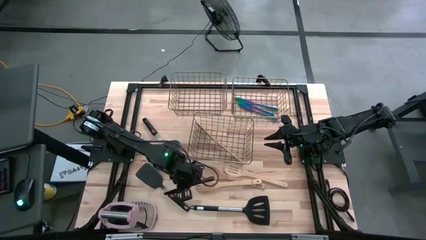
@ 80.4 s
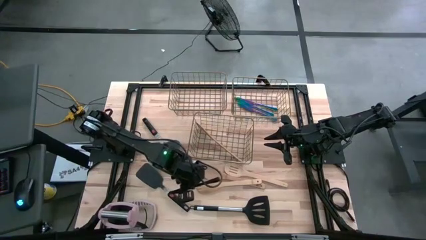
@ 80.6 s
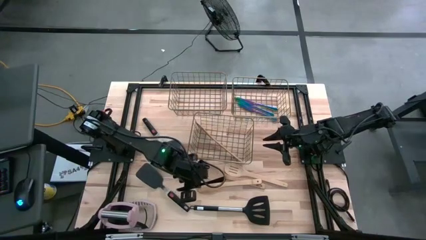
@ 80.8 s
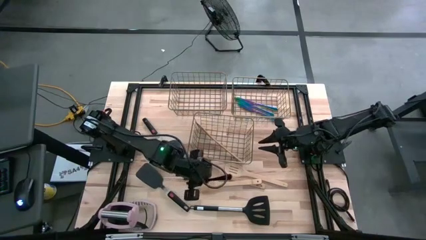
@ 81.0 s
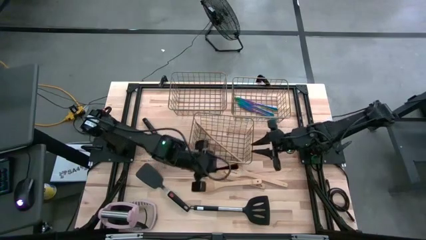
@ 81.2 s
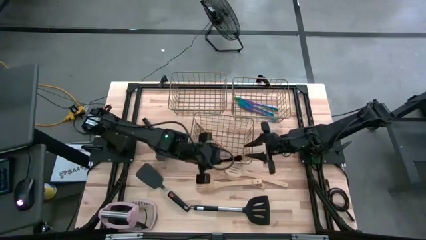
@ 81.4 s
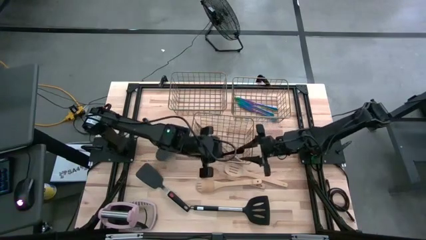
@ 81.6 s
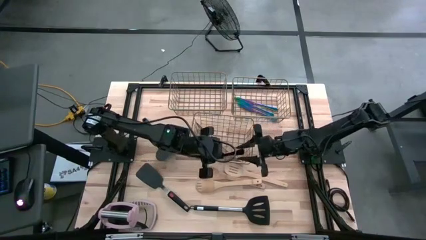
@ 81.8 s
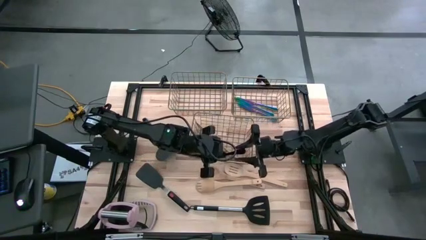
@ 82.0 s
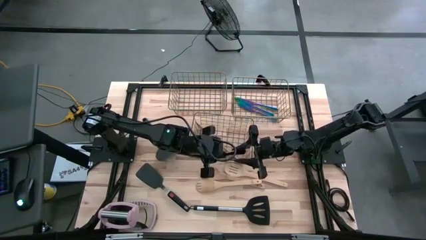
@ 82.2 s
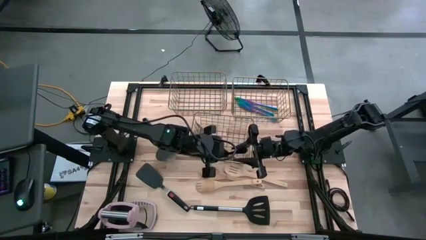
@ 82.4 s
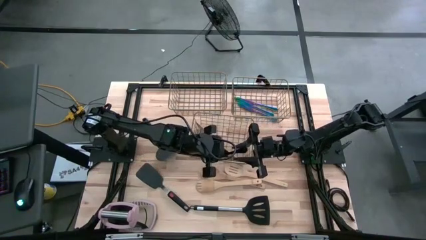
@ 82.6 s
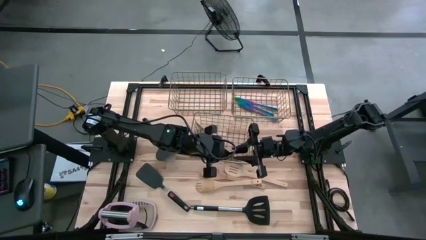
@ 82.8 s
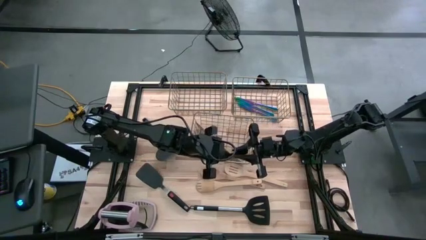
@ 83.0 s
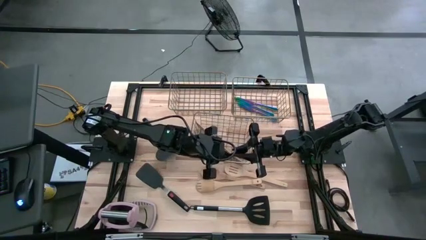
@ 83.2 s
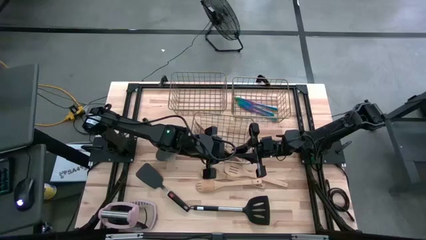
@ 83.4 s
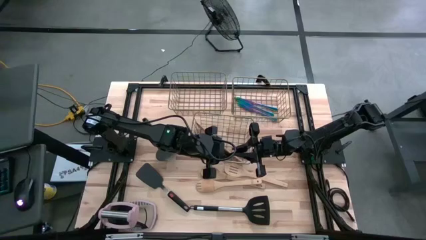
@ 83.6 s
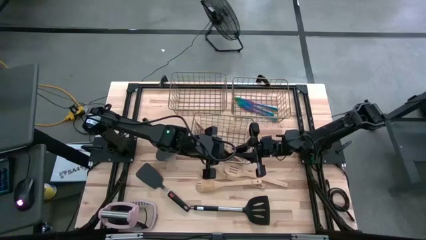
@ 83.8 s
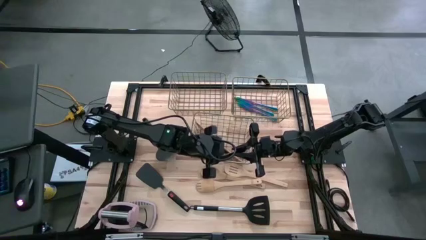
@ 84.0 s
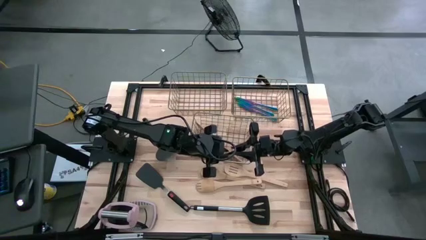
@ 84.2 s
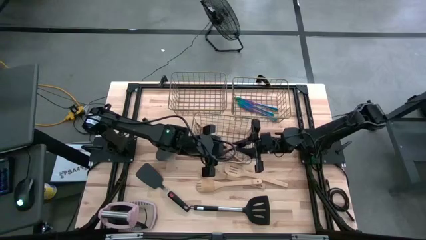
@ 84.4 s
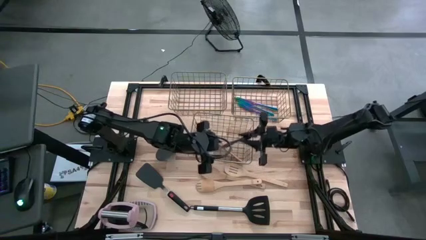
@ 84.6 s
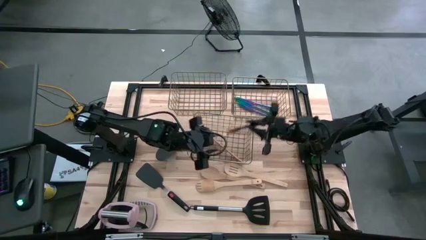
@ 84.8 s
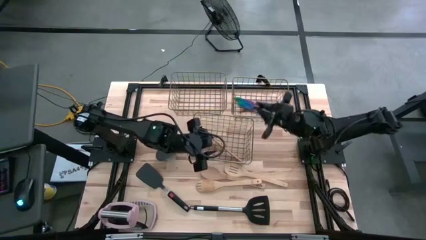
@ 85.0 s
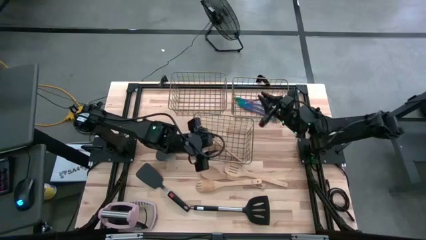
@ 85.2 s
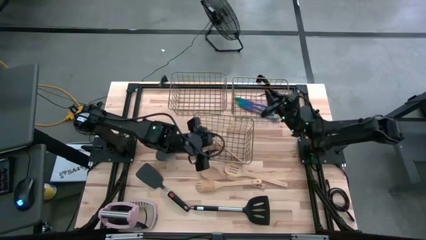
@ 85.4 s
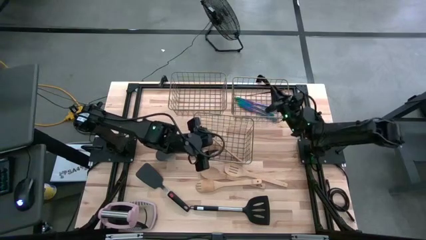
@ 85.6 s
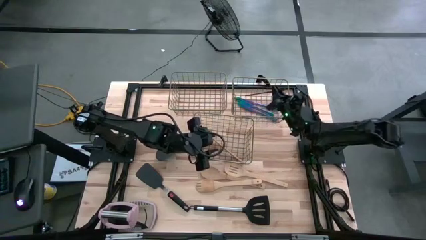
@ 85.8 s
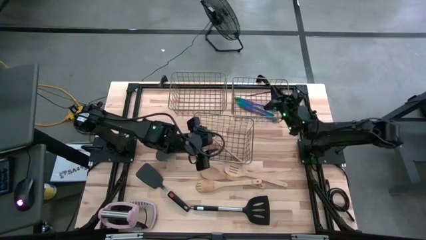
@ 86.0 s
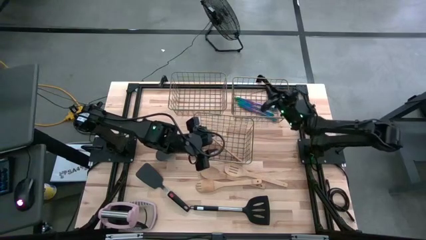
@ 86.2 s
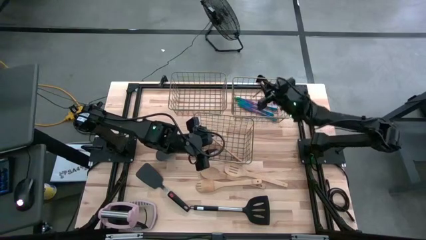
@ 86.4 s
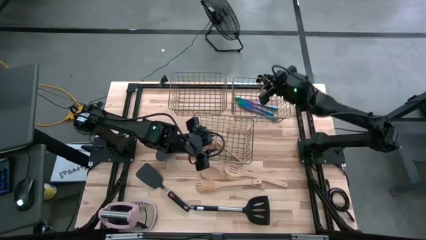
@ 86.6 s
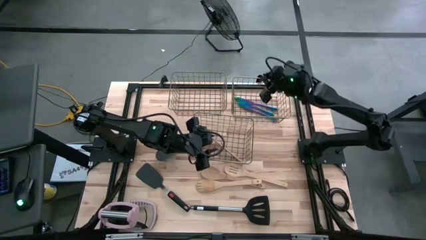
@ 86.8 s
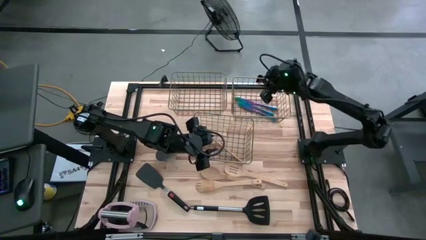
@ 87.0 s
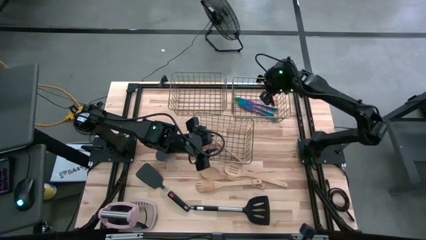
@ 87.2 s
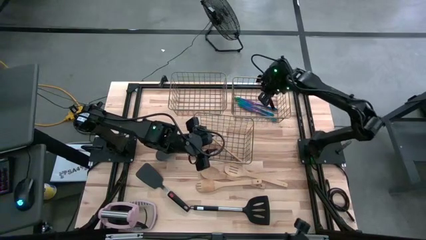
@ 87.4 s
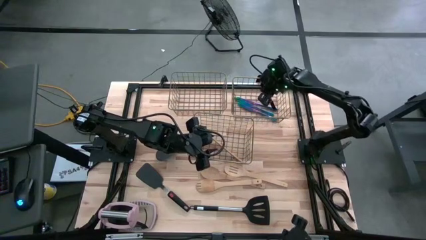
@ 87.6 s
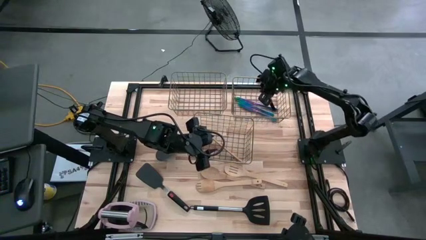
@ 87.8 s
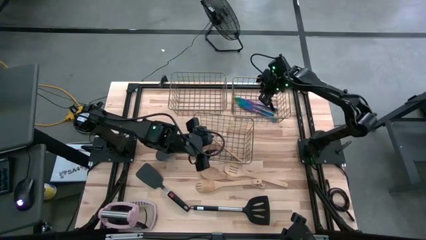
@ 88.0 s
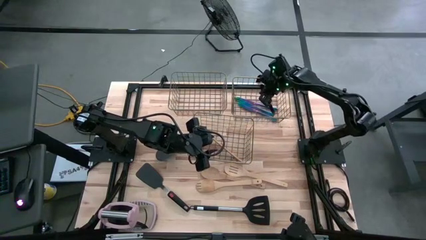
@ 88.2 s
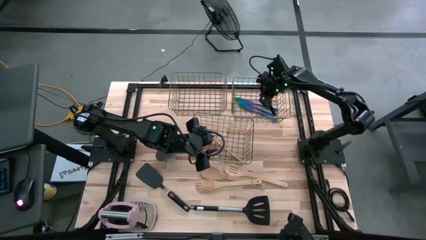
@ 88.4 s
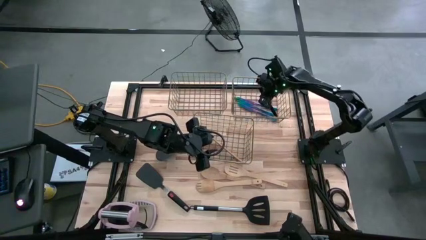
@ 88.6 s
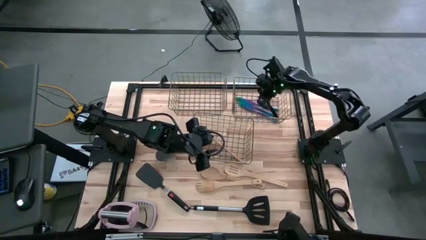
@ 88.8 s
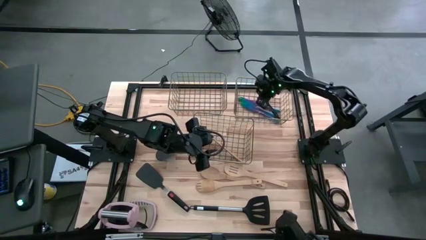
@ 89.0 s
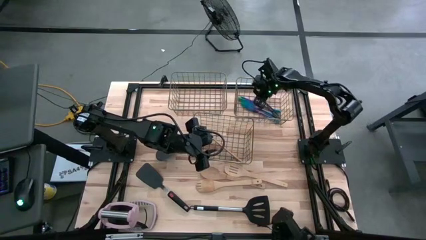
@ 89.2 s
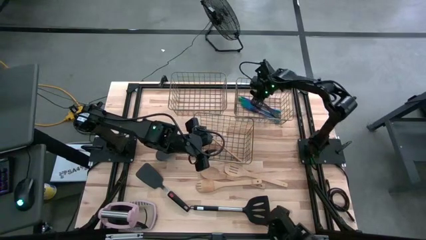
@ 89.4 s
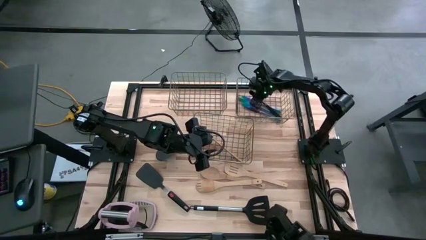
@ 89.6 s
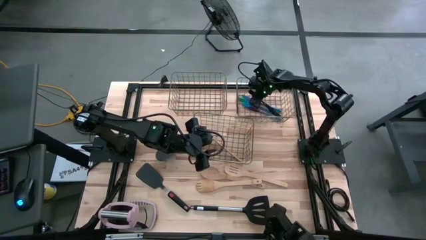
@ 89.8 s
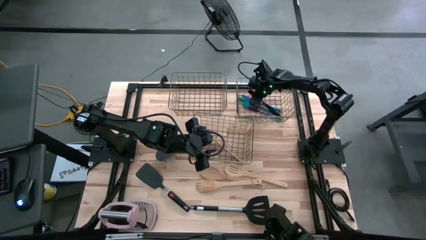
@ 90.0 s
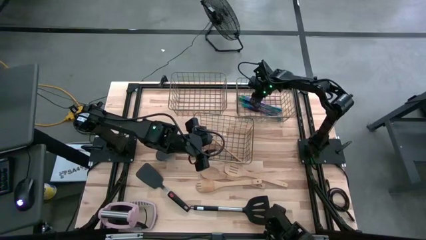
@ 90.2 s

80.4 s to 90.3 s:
Task: Pick & Place Kitchen Items
Put the black table knife into the top right wire basket

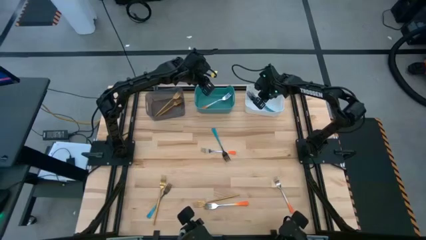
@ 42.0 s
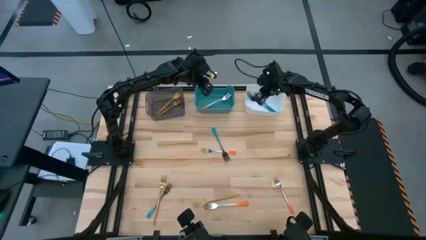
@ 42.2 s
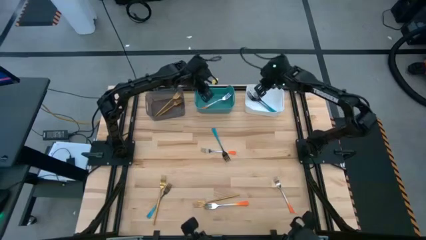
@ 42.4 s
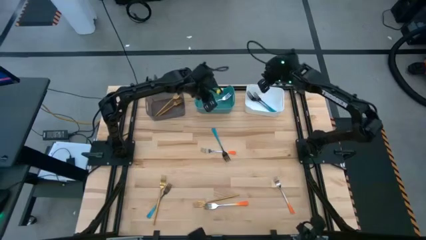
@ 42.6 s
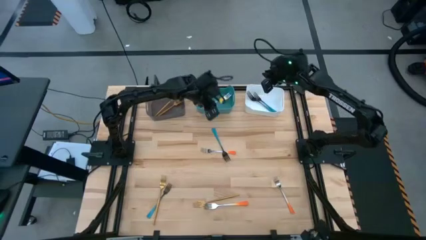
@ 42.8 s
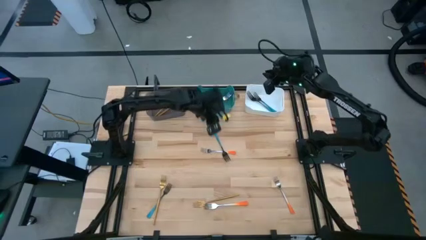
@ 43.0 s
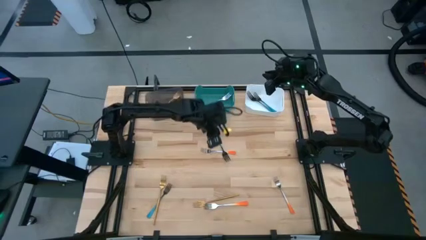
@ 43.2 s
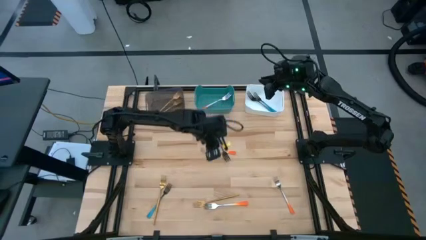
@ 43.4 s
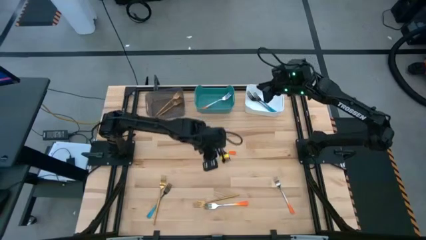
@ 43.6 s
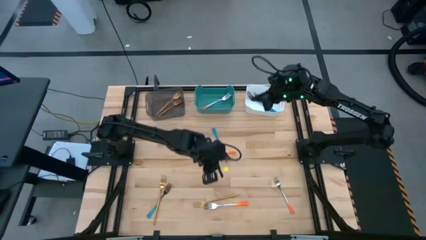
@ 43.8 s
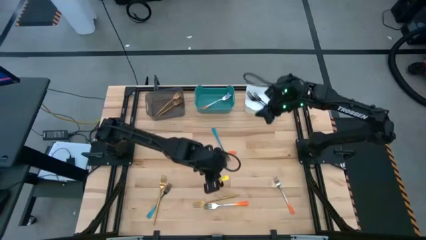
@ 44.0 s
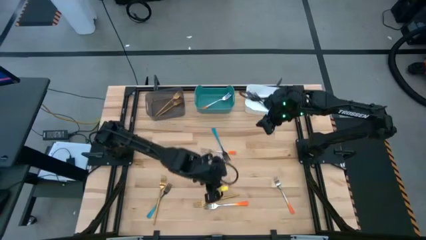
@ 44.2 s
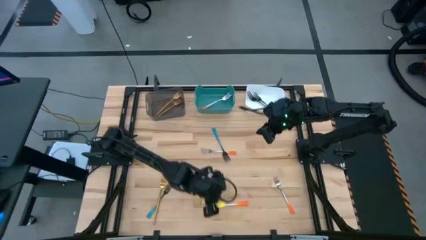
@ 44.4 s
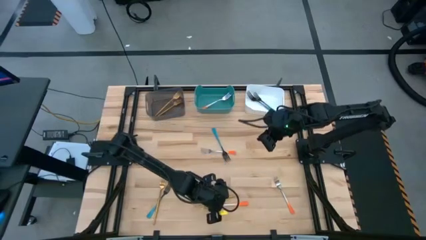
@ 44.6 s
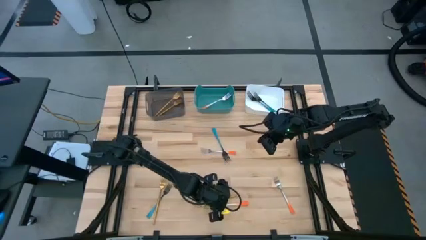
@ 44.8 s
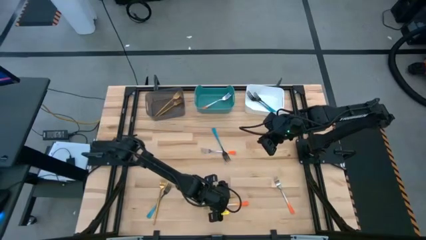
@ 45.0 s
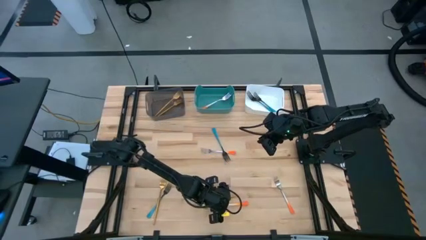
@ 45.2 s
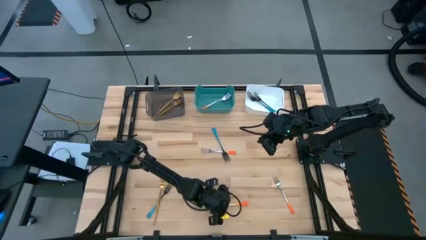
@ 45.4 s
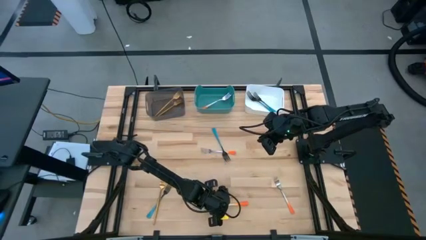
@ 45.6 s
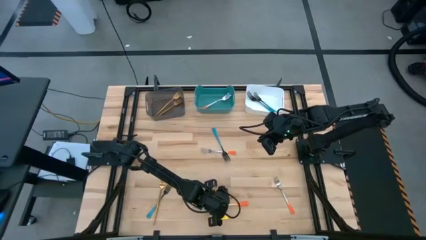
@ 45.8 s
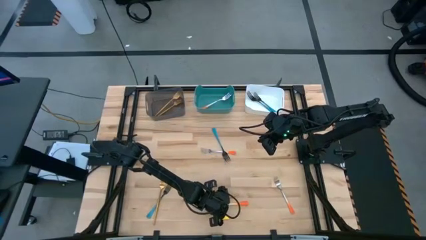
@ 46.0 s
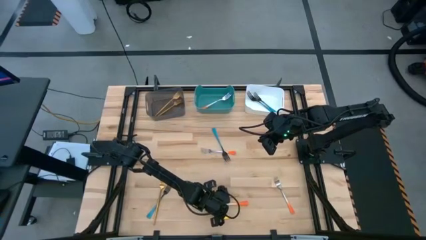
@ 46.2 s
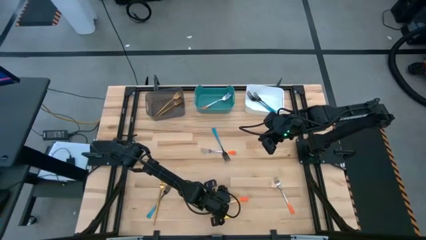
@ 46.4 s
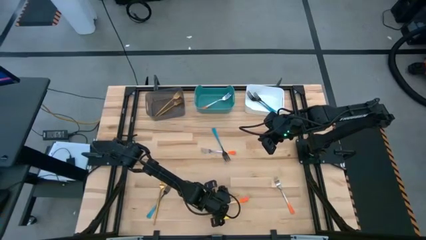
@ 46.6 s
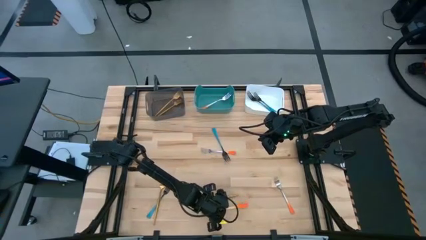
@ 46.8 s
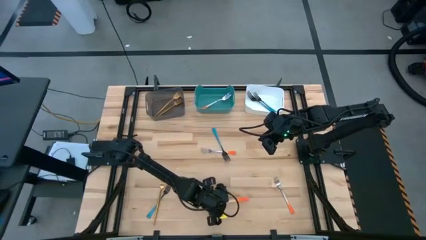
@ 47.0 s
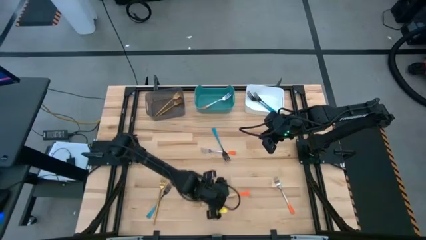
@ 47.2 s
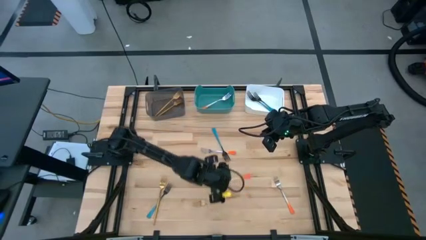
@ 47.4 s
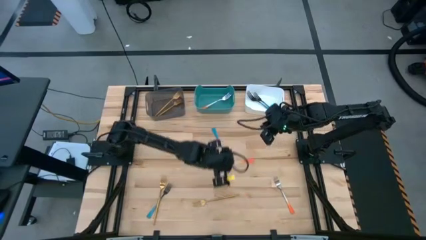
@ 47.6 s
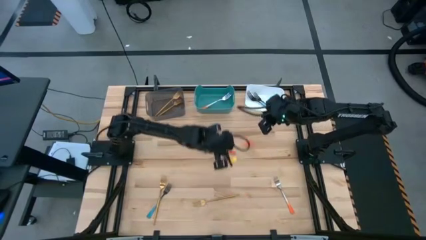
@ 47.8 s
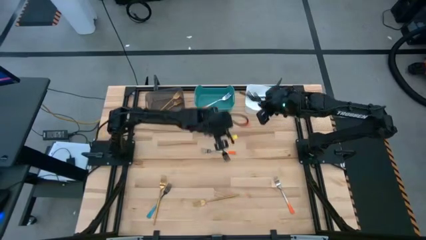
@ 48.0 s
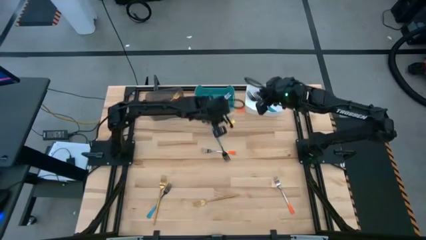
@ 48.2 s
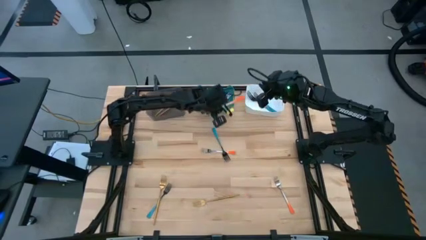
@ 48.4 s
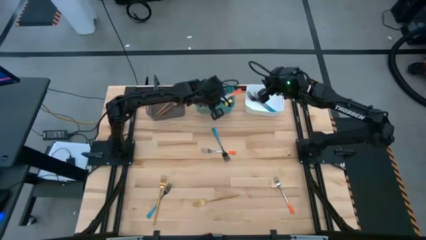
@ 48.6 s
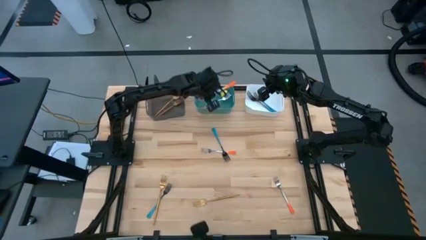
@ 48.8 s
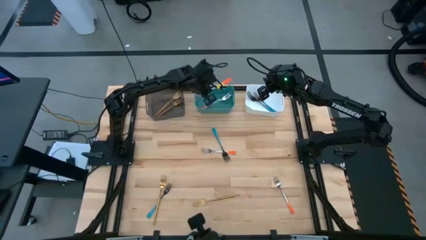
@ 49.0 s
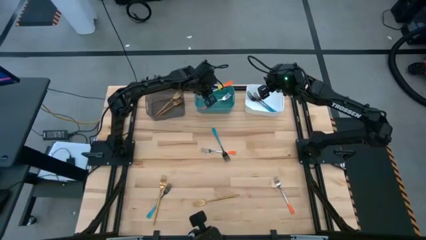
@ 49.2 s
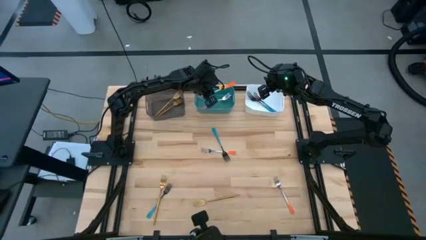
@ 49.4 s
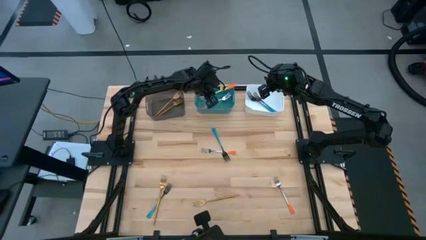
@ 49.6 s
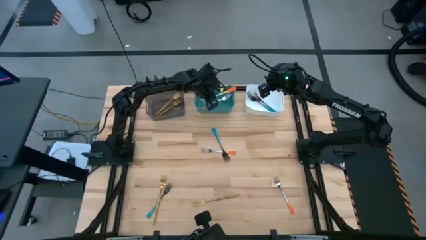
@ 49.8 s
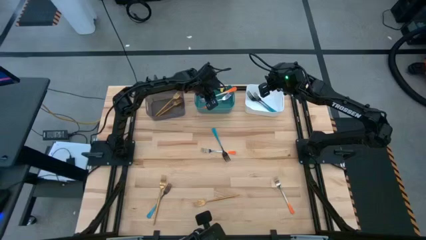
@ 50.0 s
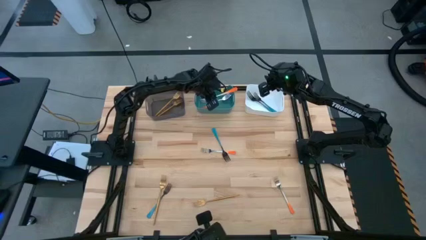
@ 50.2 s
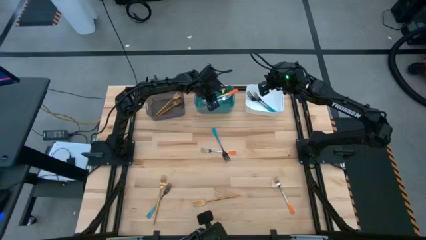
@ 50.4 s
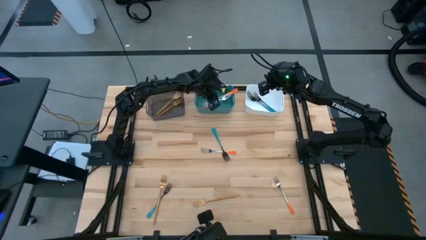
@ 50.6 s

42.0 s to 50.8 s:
Task: Sort silverware by color (type)
Put the orange fork into the green bin
